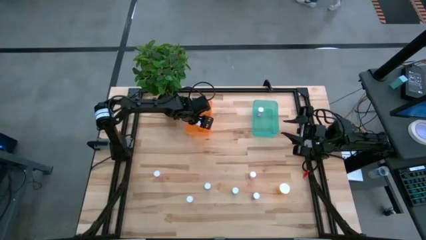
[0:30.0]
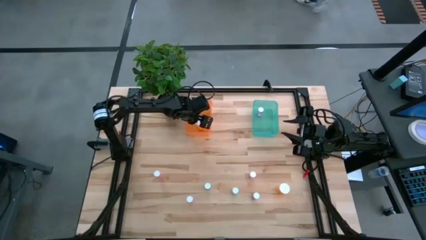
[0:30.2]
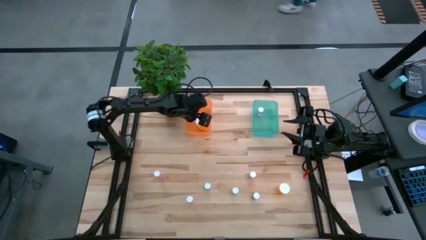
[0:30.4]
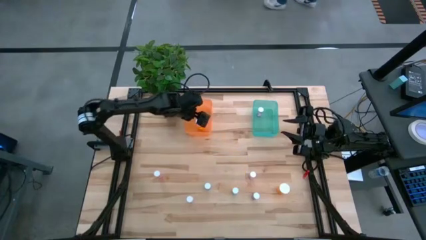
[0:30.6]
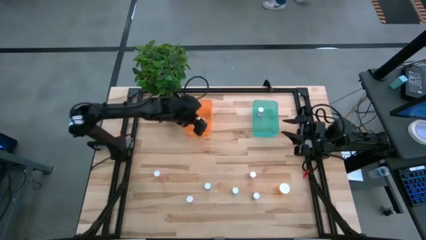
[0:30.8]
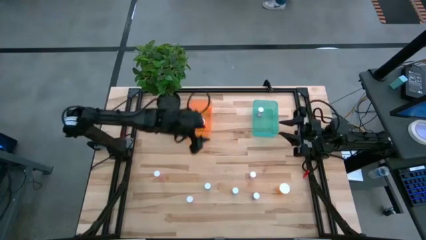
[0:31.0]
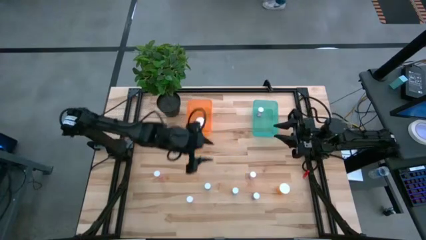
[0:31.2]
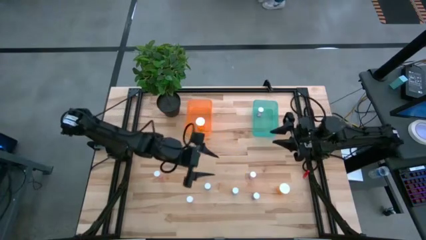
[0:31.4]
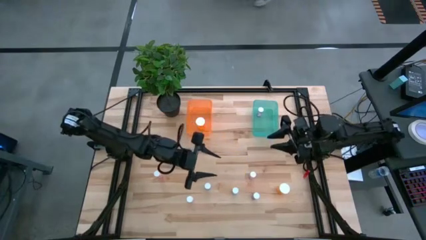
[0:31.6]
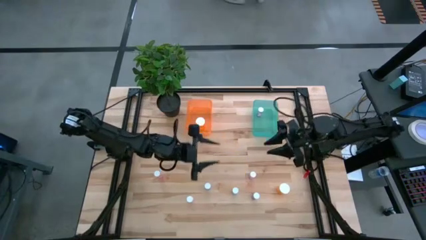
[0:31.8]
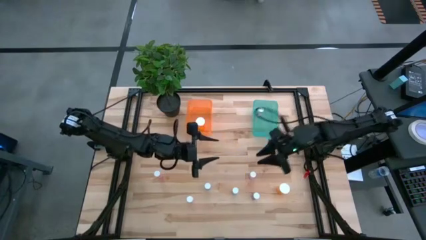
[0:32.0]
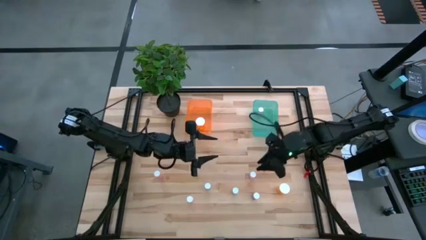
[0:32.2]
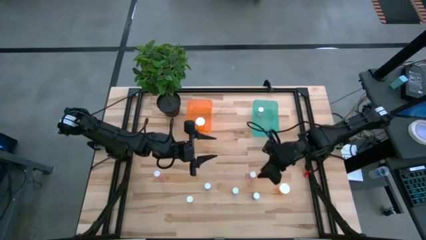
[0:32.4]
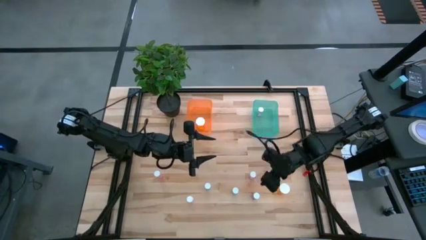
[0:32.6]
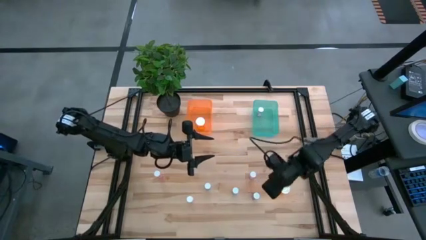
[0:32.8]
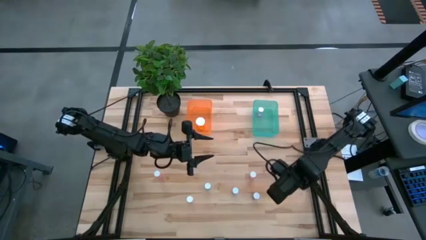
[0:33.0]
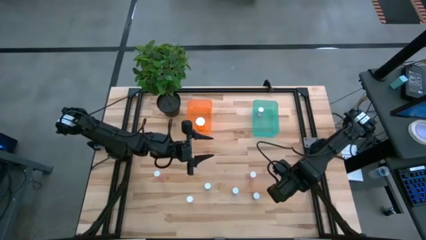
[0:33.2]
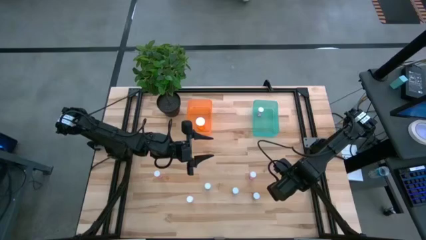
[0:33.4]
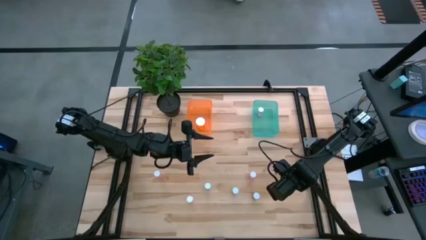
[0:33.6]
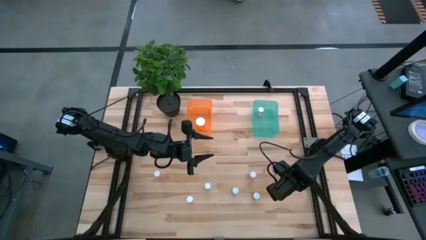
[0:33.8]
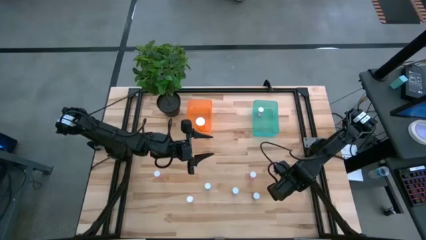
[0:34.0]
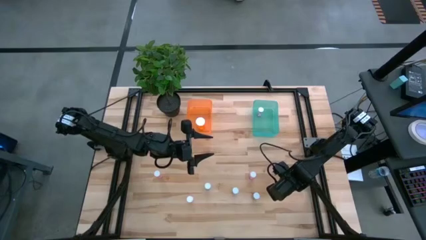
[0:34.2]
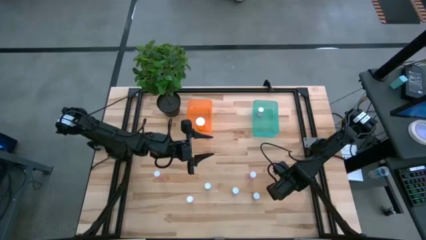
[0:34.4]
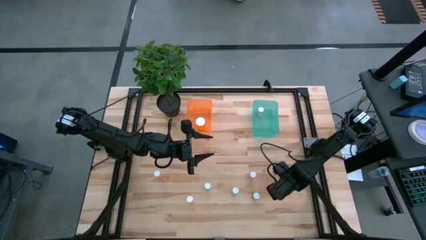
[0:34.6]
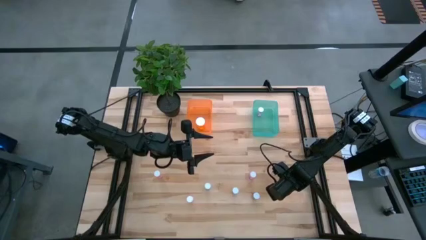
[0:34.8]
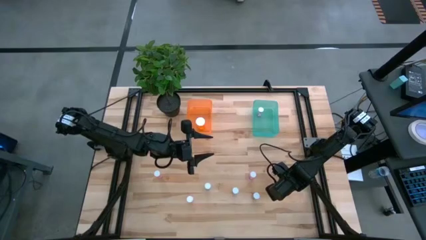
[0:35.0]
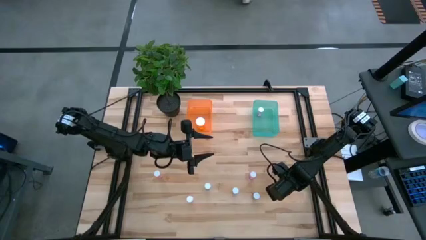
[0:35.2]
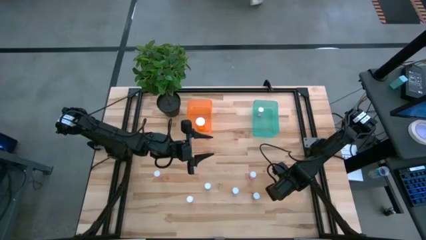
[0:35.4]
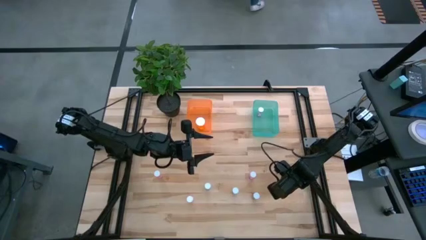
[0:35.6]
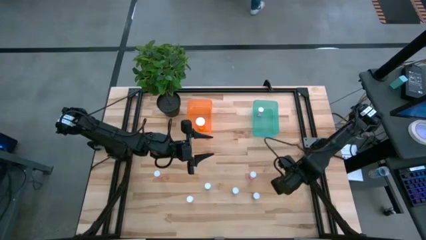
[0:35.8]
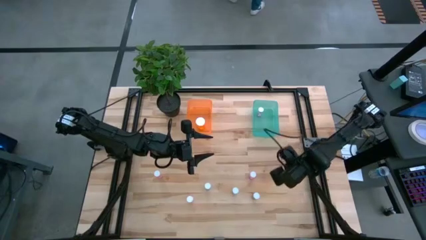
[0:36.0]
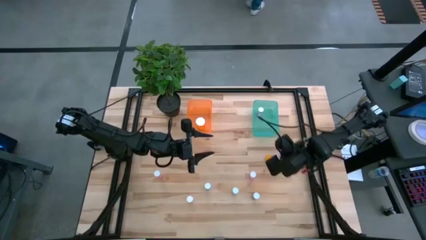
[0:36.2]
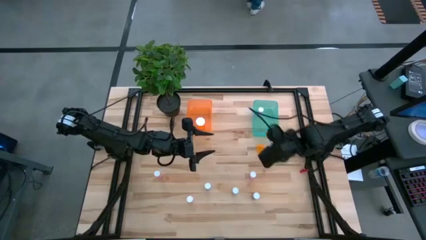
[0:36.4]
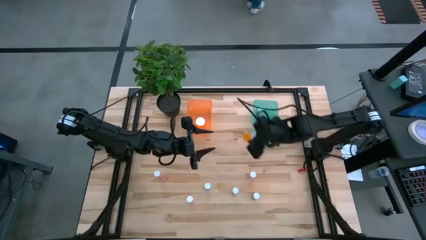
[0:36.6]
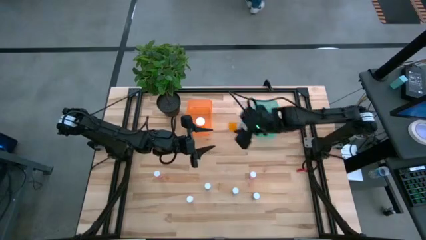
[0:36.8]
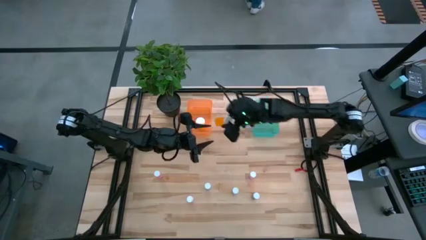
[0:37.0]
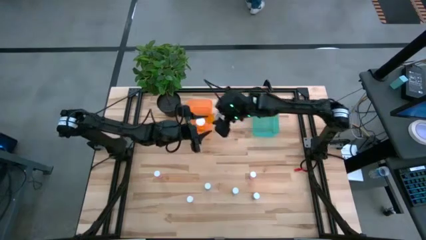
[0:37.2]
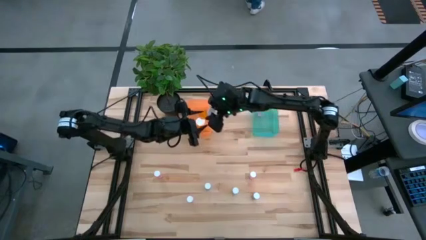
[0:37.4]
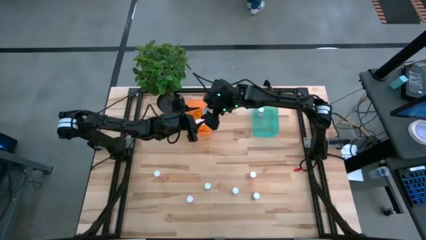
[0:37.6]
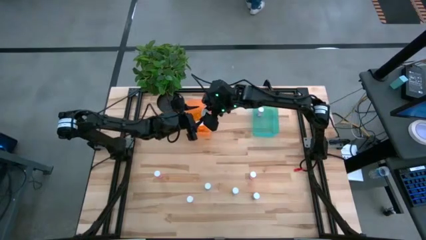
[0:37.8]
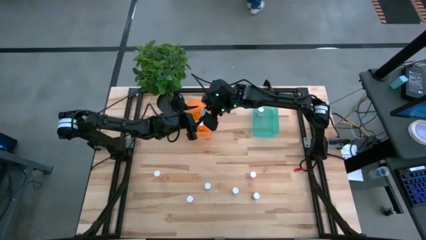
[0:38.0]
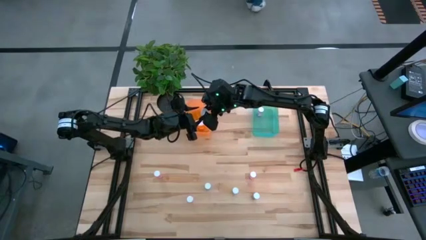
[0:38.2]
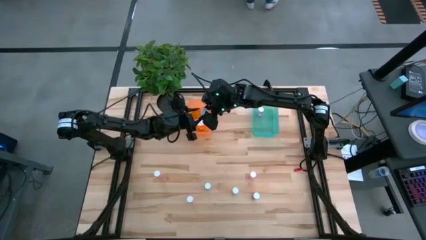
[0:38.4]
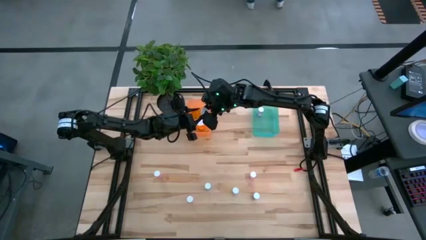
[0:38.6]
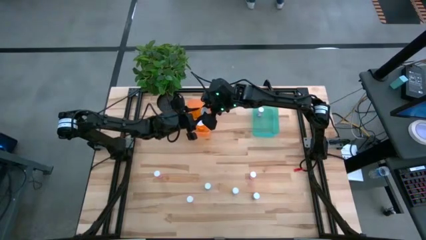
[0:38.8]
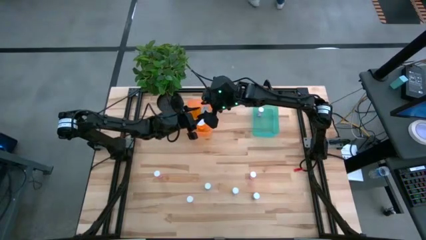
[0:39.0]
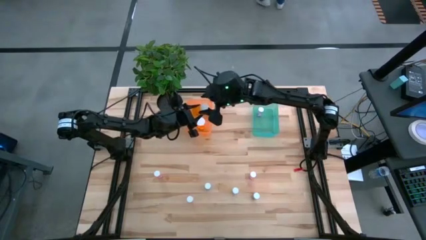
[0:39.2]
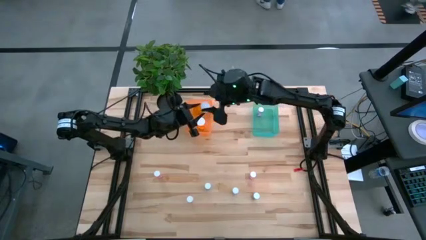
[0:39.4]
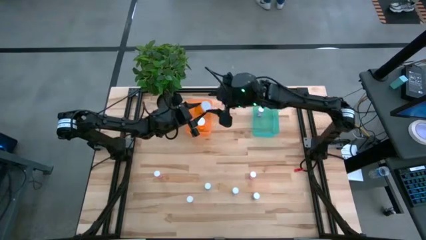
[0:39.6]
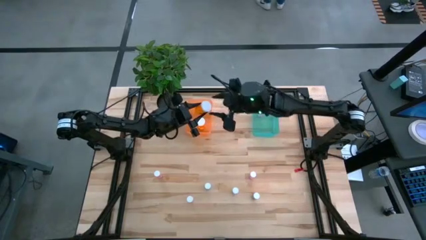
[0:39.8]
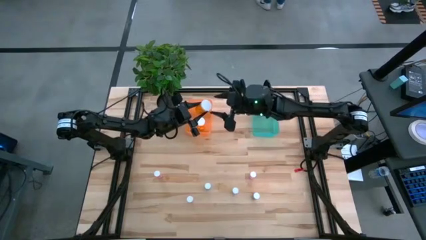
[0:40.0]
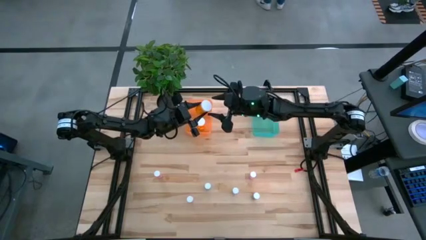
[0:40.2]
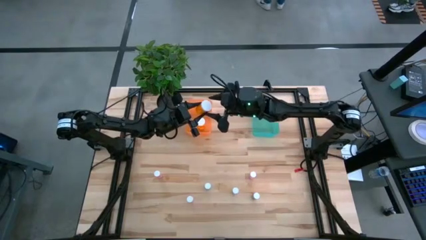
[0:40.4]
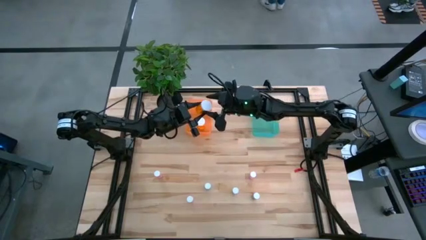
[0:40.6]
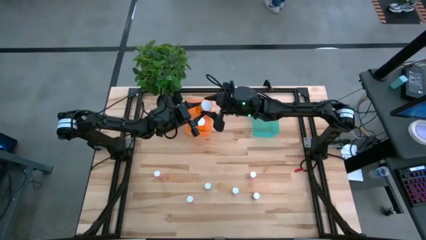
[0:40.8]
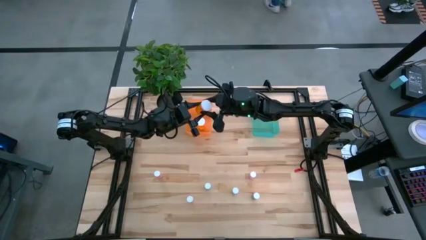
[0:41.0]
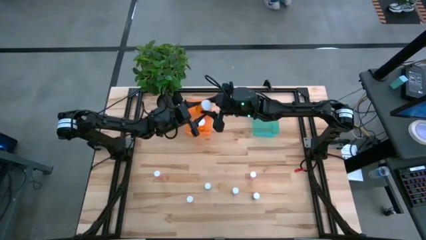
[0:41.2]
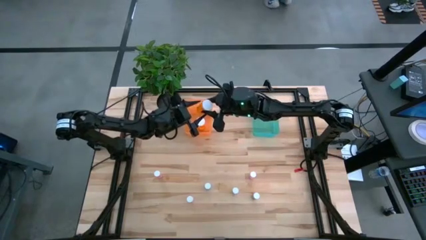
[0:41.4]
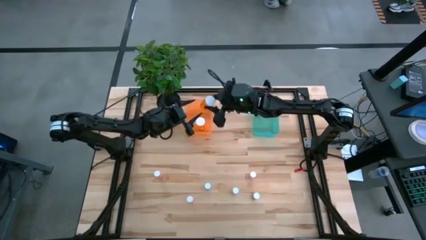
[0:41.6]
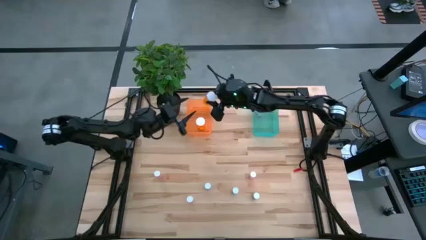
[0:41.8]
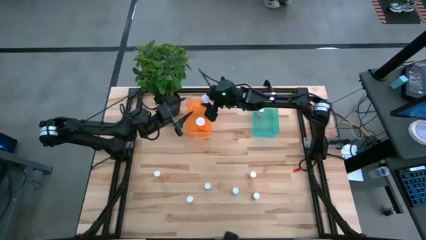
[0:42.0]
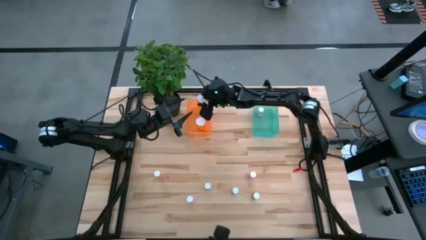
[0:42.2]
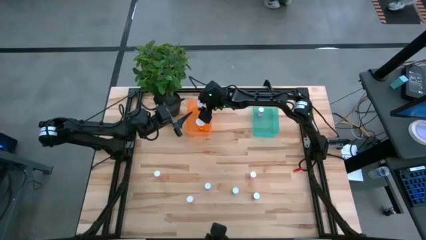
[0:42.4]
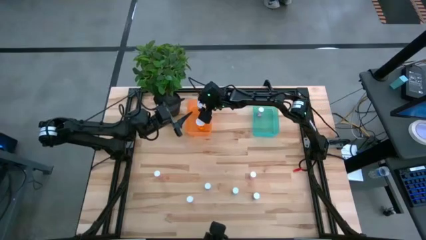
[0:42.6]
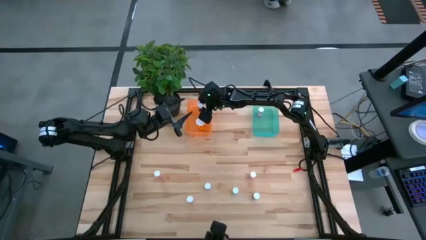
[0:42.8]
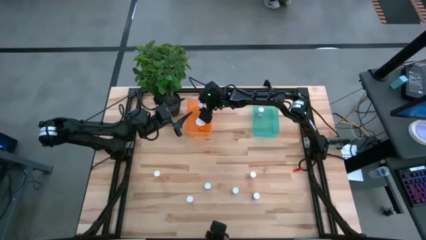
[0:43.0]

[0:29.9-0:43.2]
Task: Pick and place medicine bottles into bin by pill shape (circle, oval)
Put the orange capsule bottle into the orange bin
